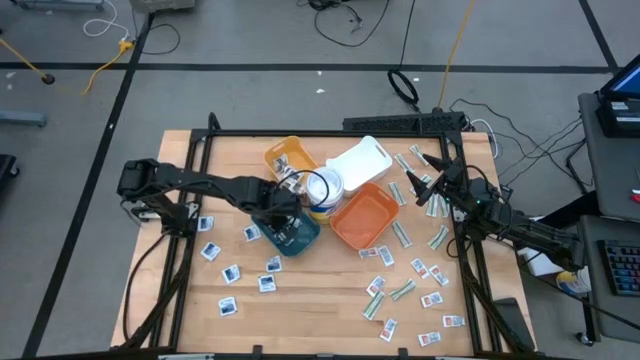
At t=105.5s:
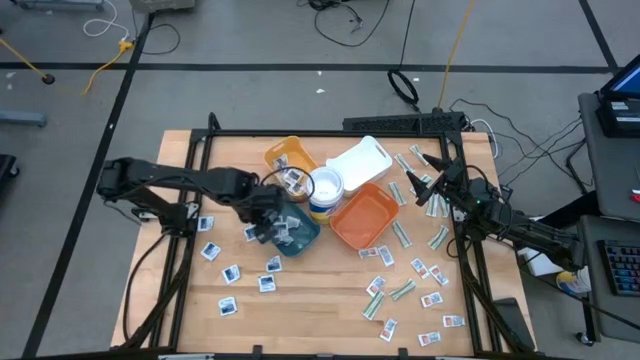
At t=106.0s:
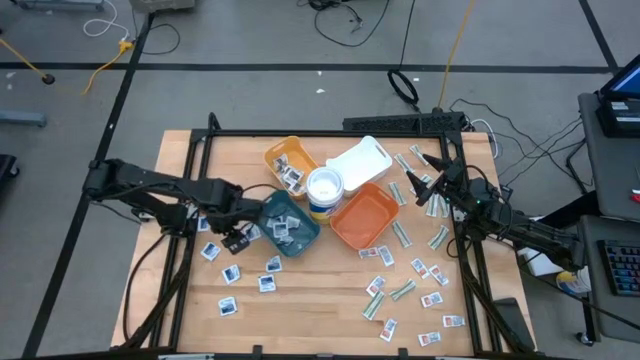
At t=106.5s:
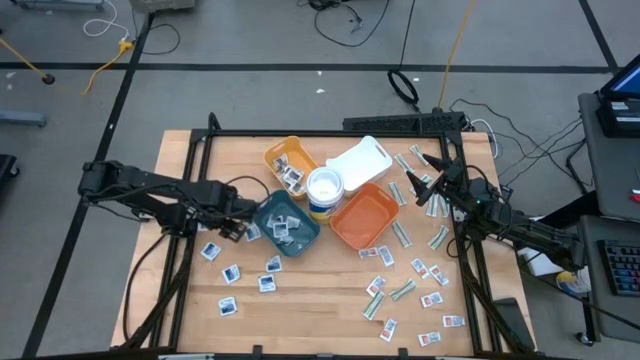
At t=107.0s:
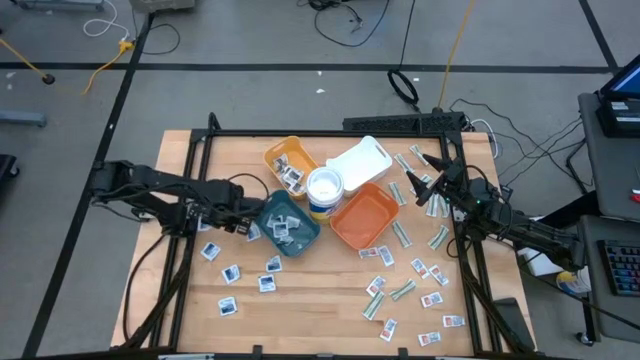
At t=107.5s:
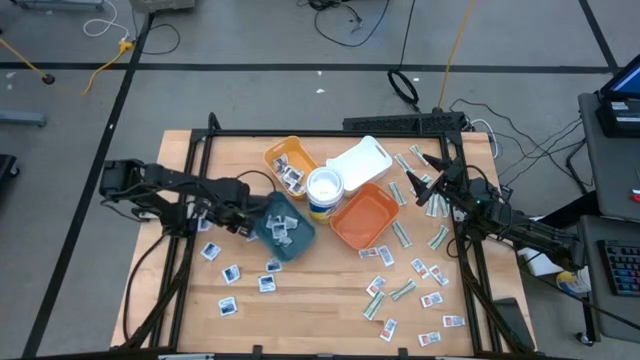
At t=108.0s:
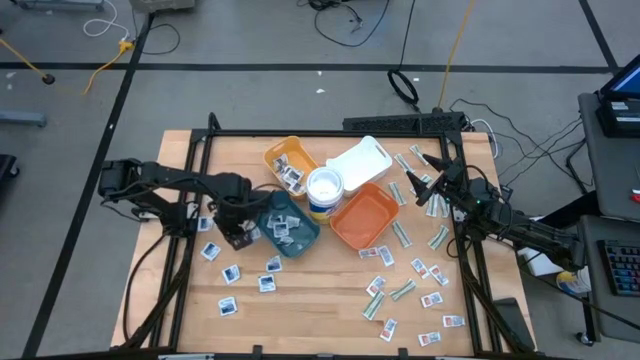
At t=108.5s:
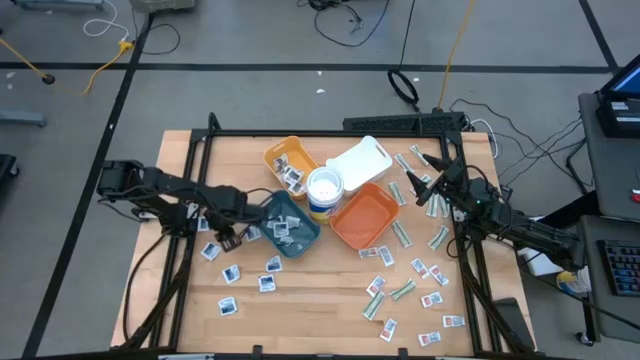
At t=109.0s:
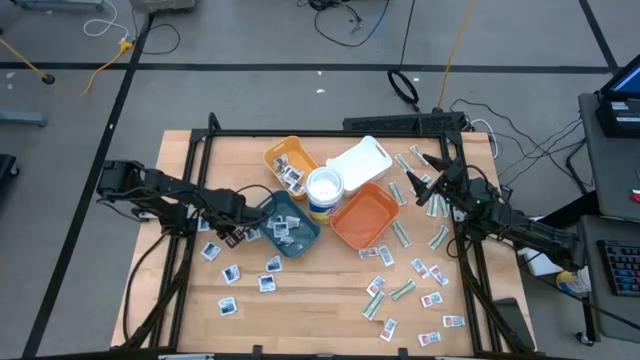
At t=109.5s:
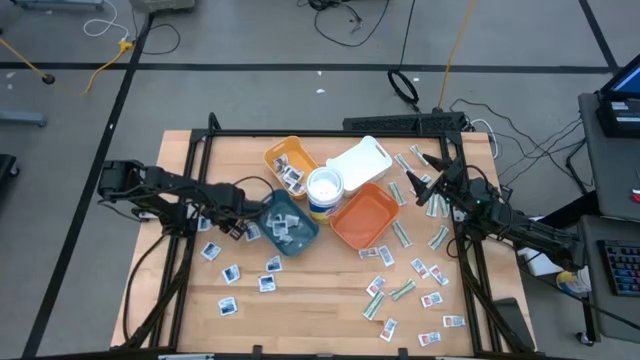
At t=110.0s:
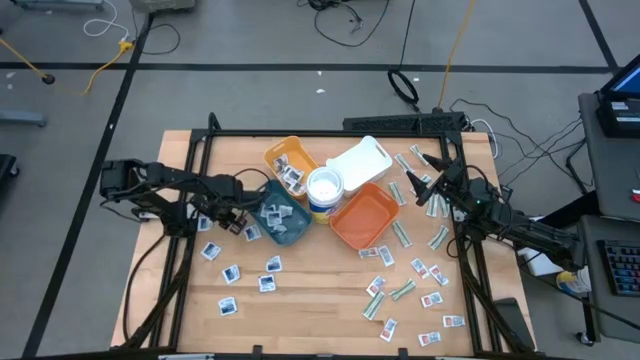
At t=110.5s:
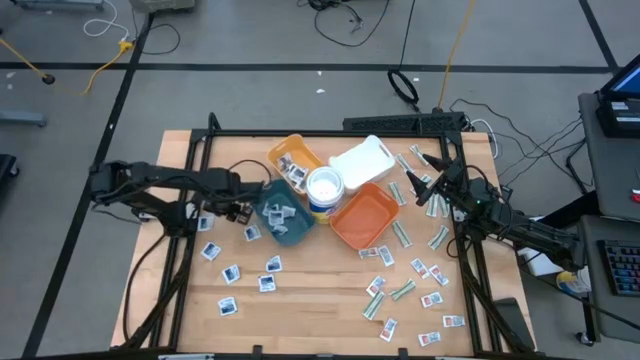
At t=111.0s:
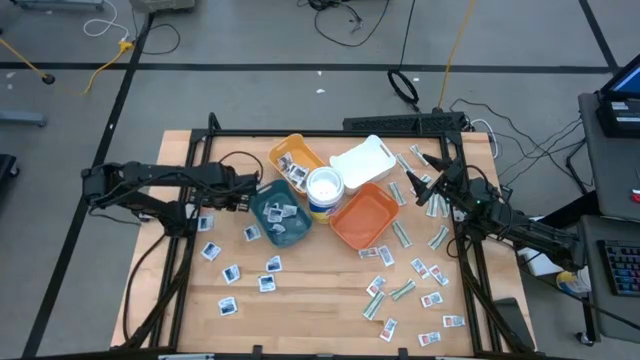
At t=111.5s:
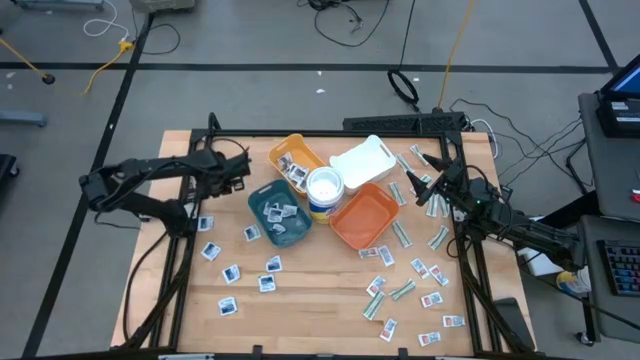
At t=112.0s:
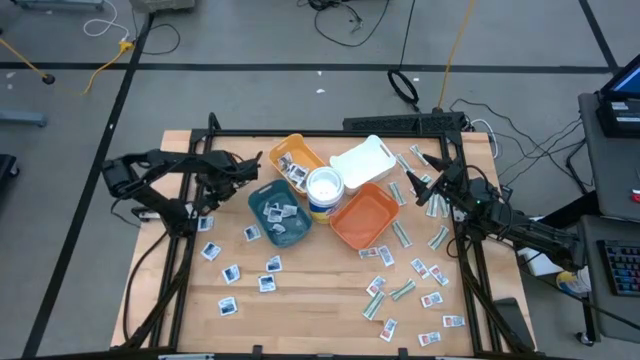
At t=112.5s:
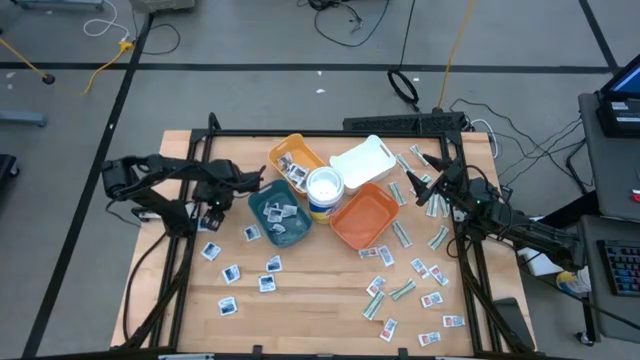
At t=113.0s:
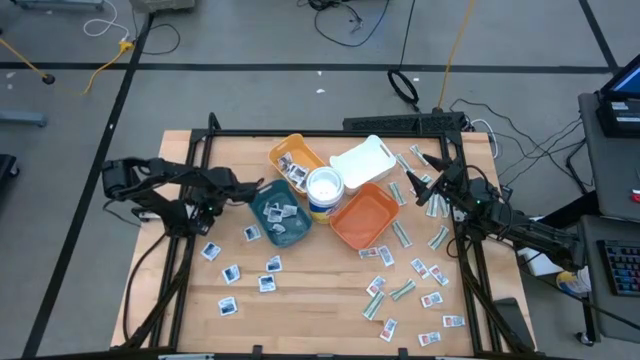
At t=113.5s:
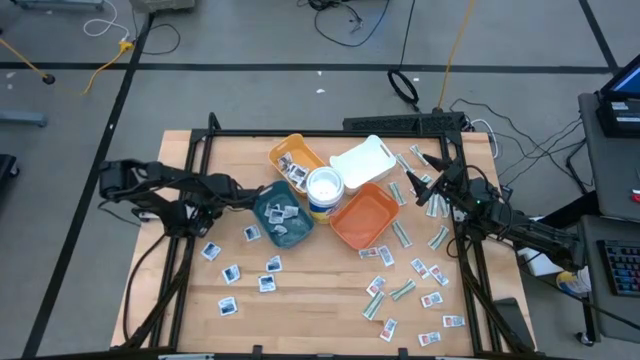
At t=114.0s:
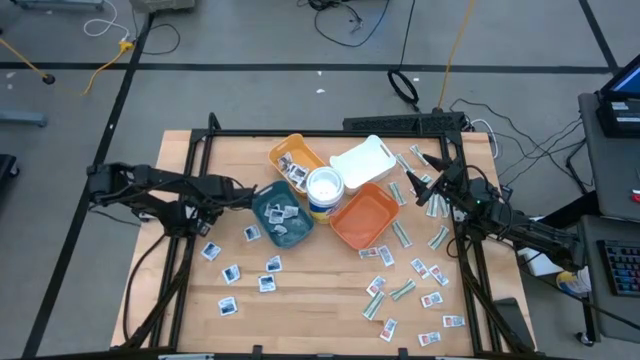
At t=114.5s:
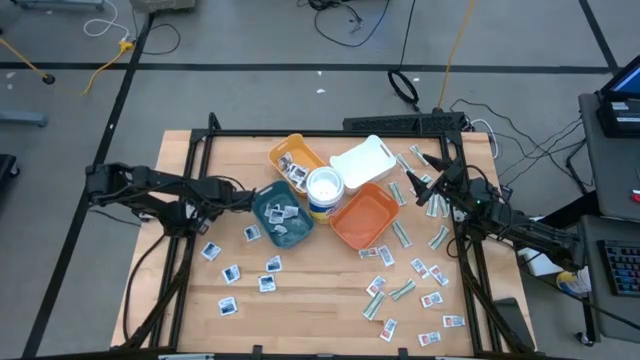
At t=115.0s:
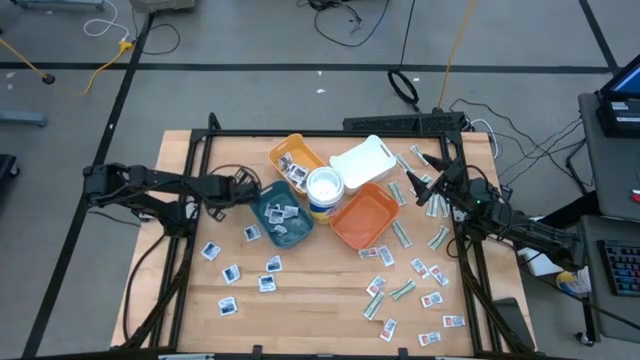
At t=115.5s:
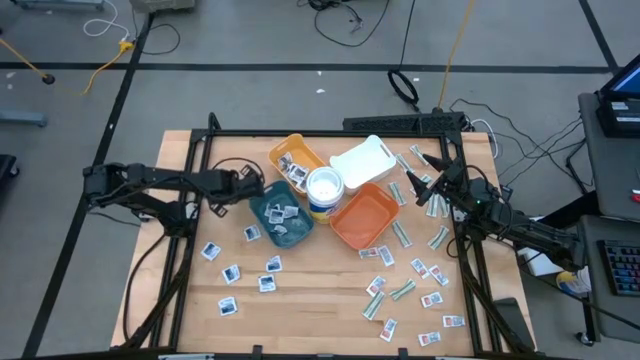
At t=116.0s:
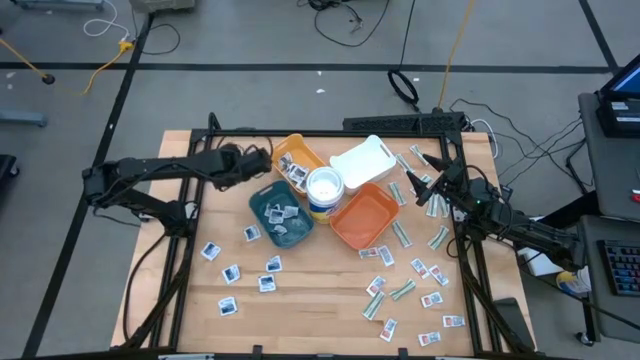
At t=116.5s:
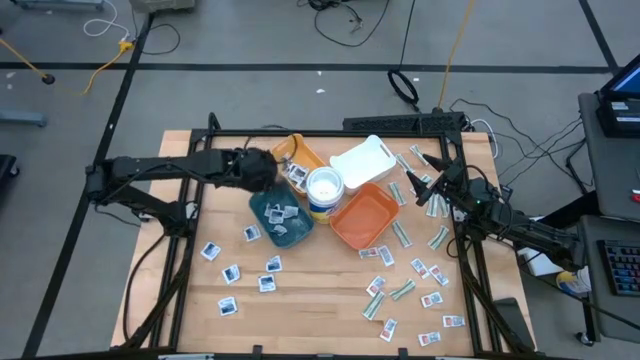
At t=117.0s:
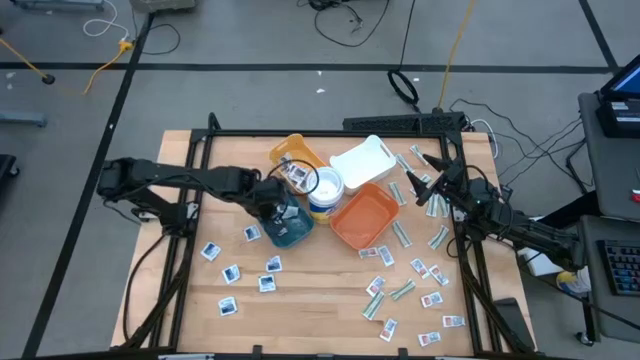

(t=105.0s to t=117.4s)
Task: Pick & Place First Aid Supplies
Put the blue pad into the blue bin

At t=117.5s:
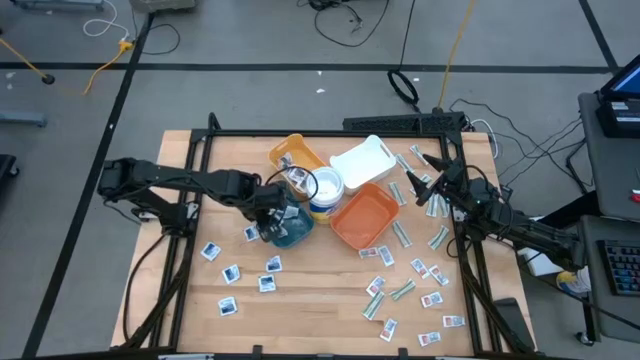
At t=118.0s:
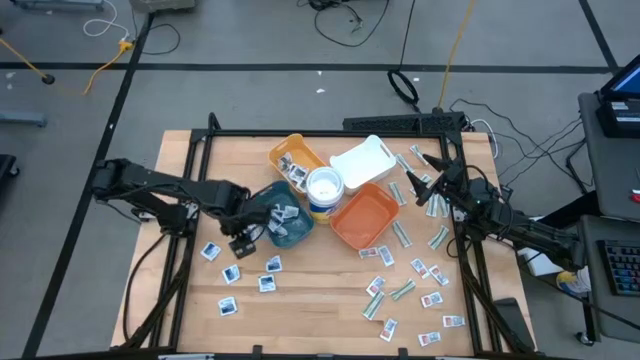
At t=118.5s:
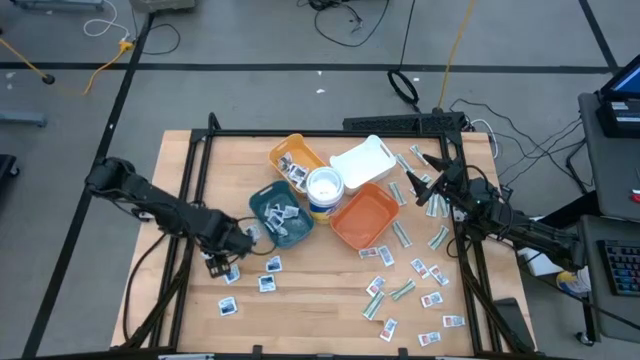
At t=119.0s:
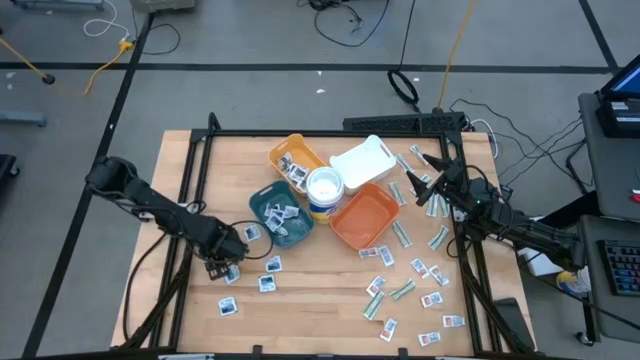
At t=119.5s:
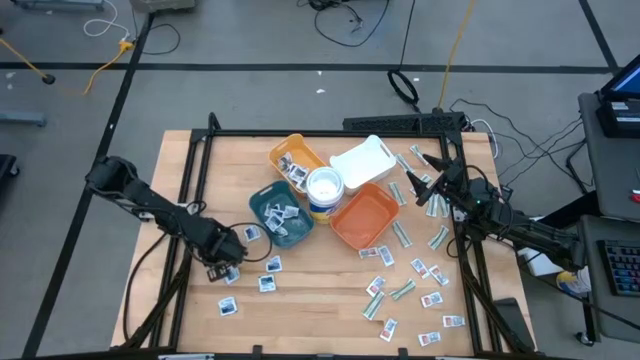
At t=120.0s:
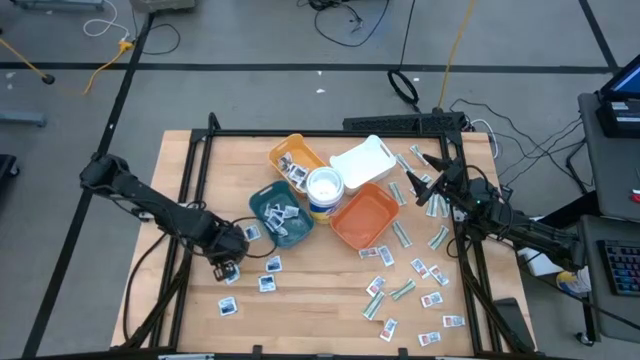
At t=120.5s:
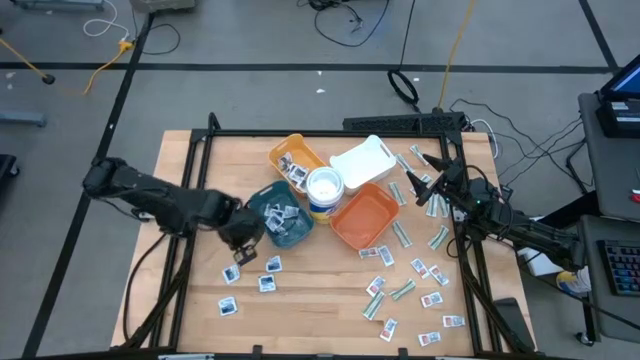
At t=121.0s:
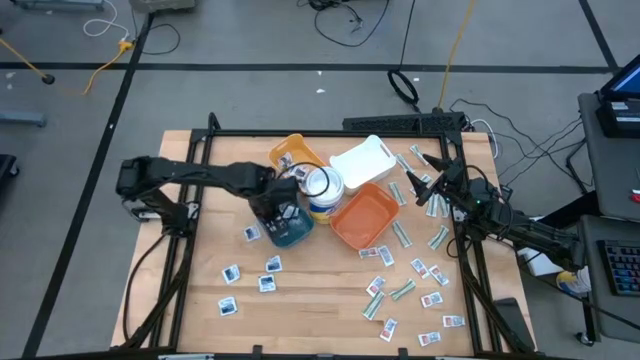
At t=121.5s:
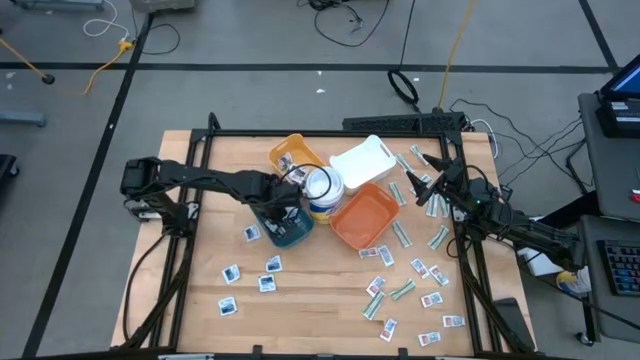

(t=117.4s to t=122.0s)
Put the blue pad into the blue bin

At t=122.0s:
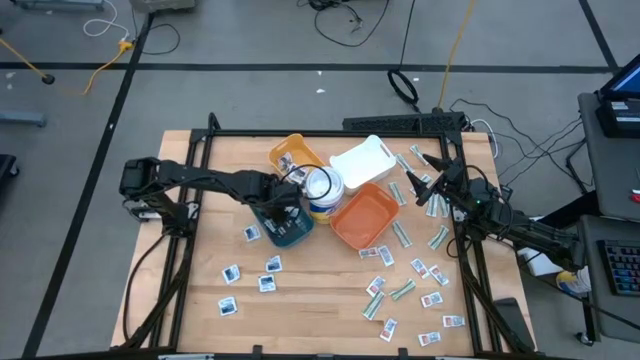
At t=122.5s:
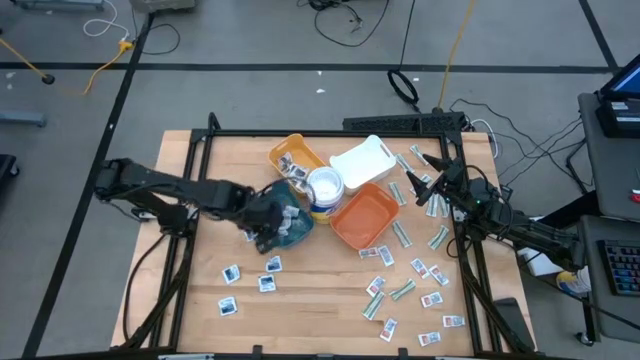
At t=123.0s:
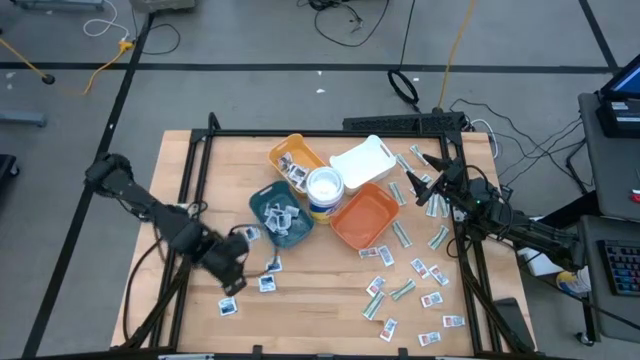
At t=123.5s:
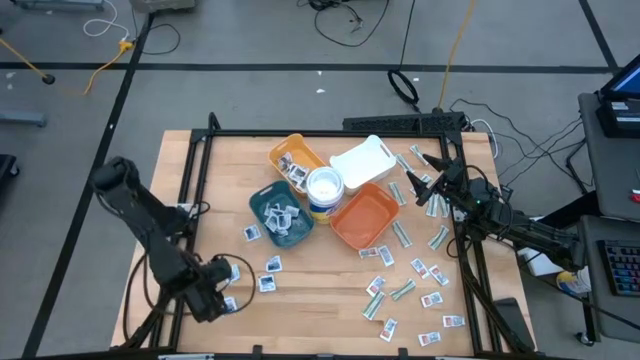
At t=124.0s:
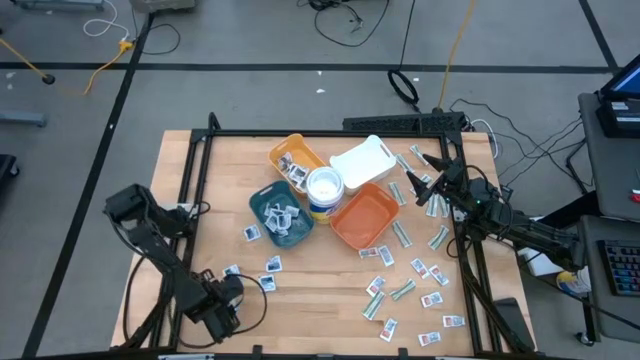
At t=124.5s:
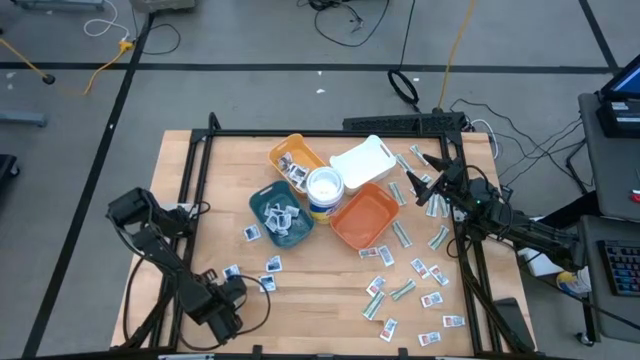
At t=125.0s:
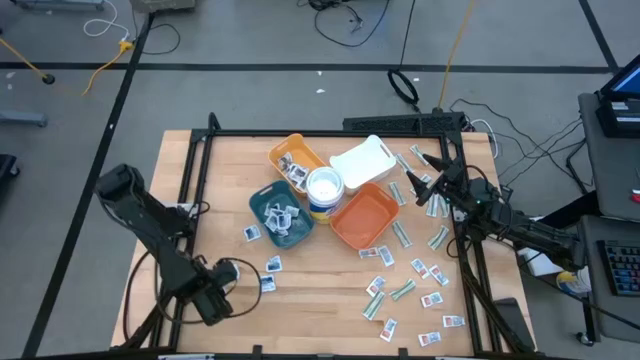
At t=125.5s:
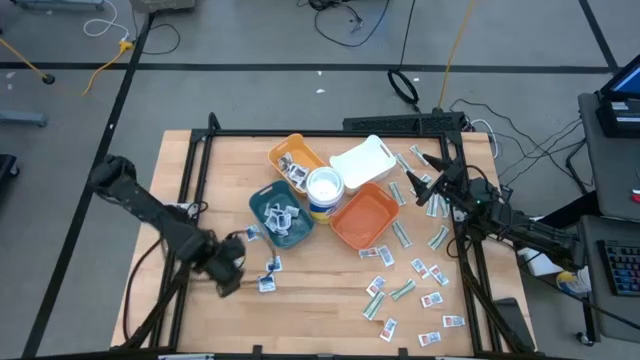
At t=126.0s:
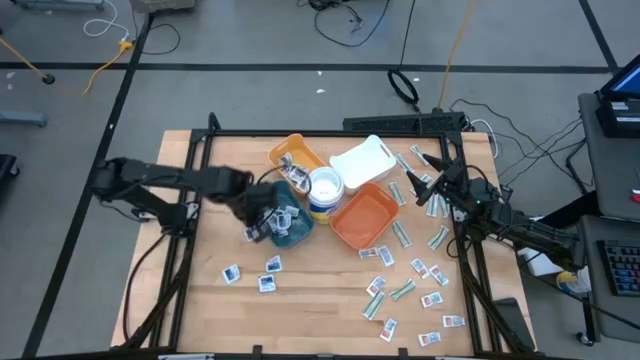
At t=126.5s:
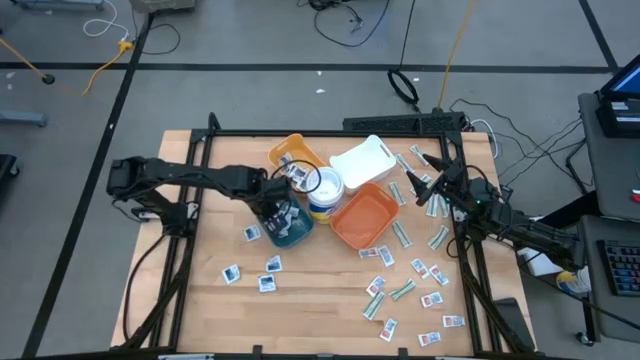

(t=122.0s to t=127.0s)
Put the blue pad into the blue bin
